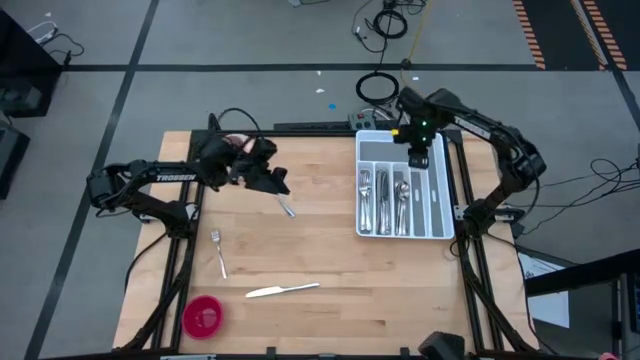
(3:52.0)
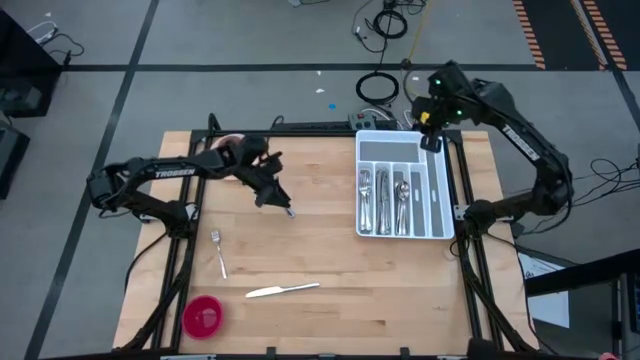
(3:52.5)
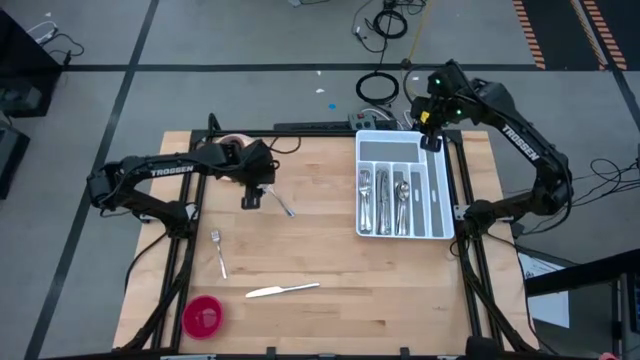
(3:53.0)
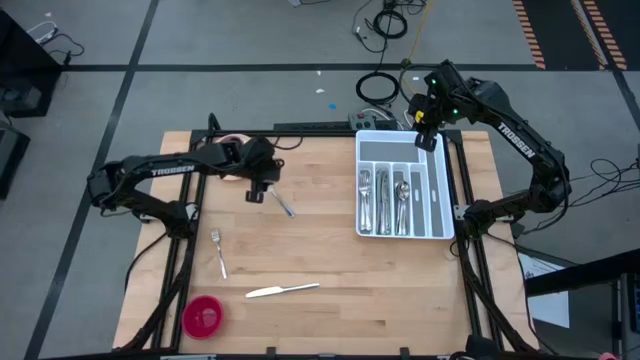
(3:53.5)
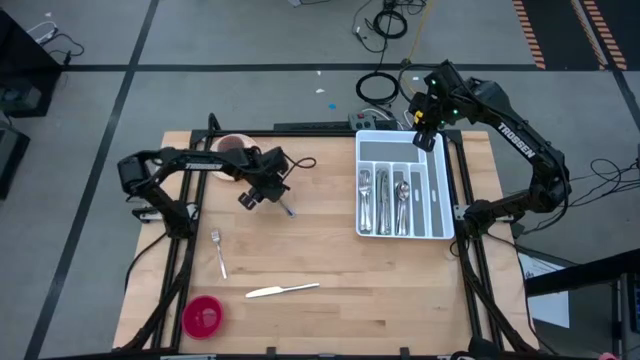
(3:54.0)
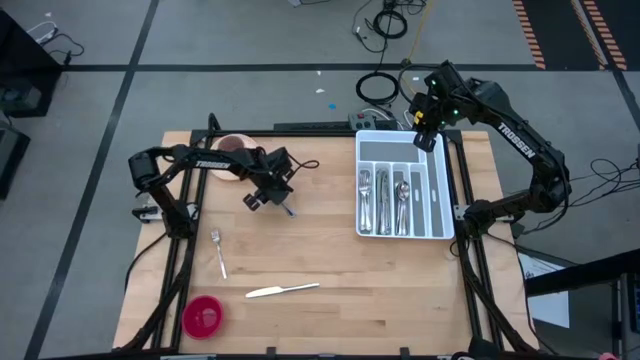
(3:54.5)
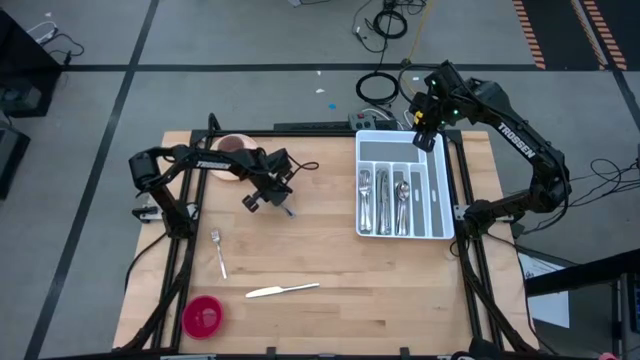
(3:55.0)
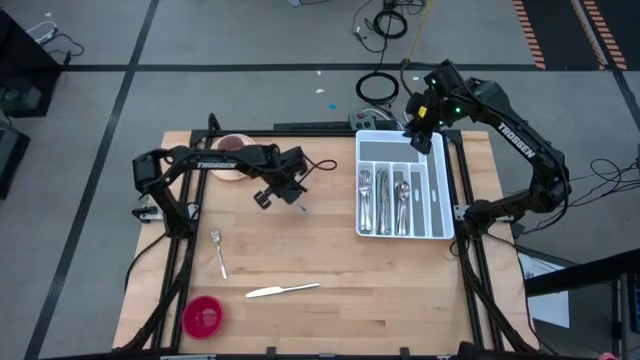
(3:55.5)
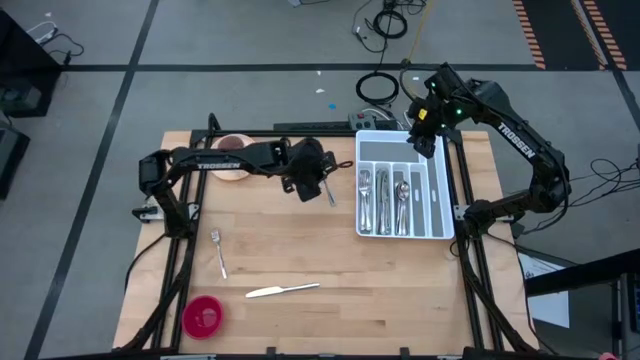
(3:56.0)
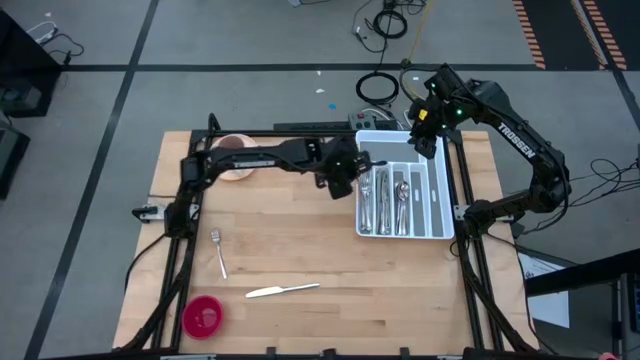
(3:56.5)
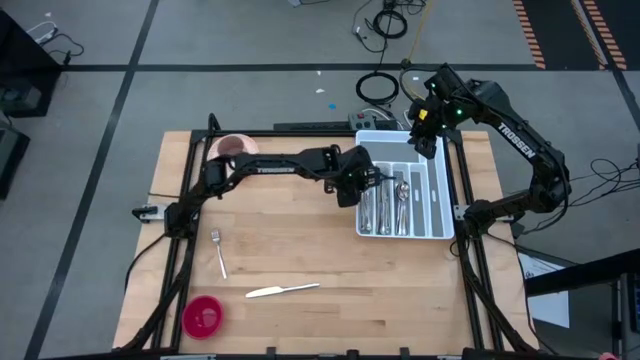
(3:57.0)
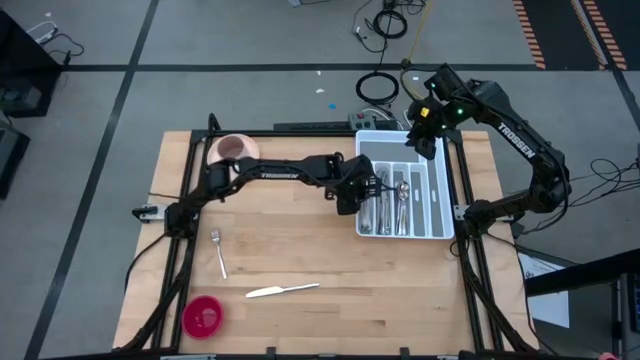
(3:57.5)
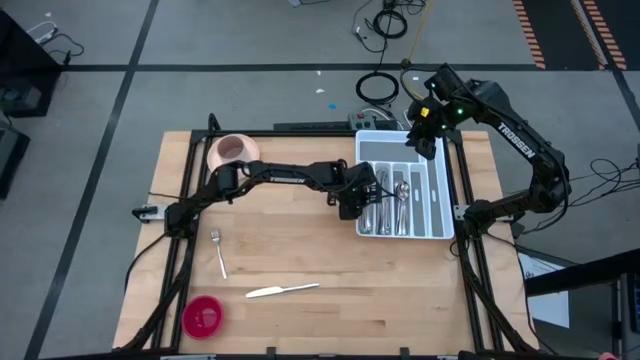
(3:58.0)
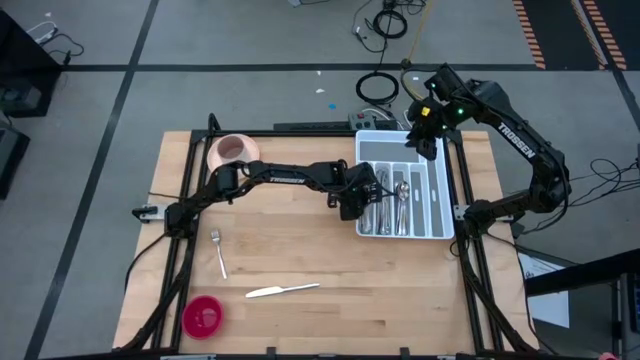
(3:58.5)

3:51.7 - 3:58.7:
Task: Sort silverware
Put the top silver fork into the white silverware tray

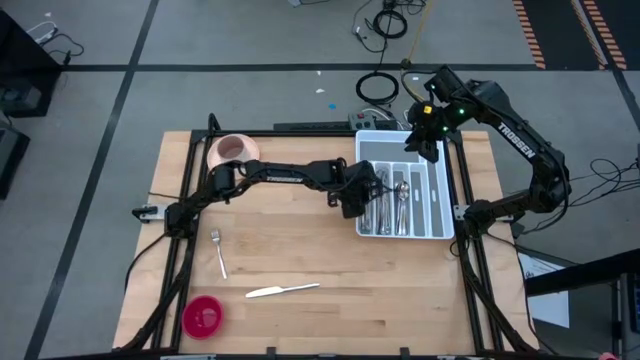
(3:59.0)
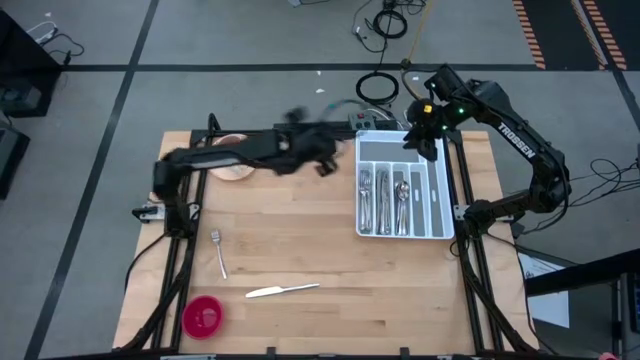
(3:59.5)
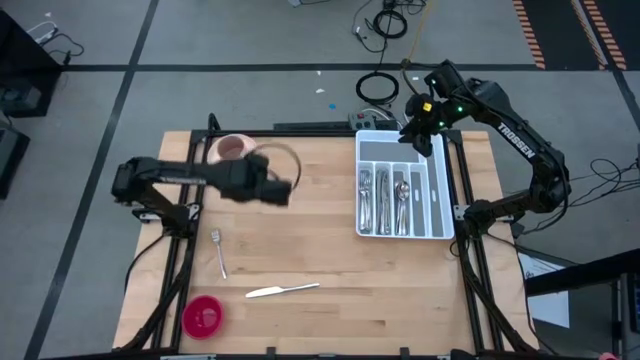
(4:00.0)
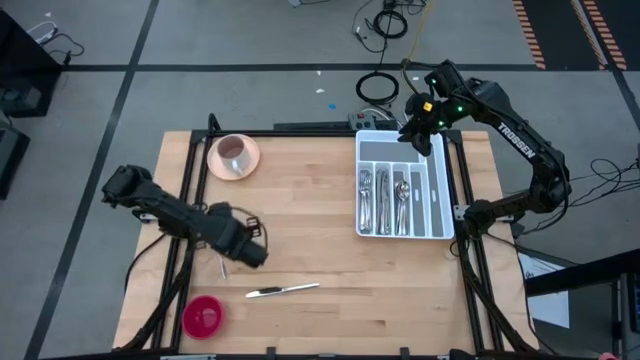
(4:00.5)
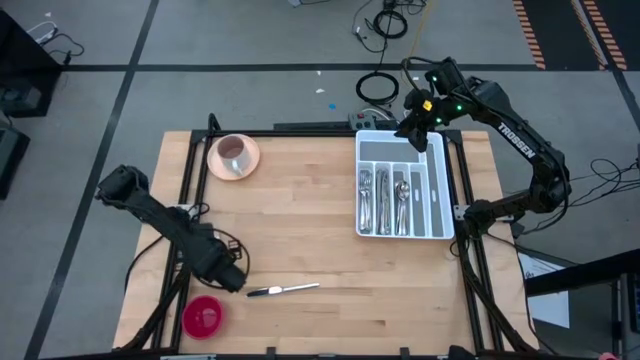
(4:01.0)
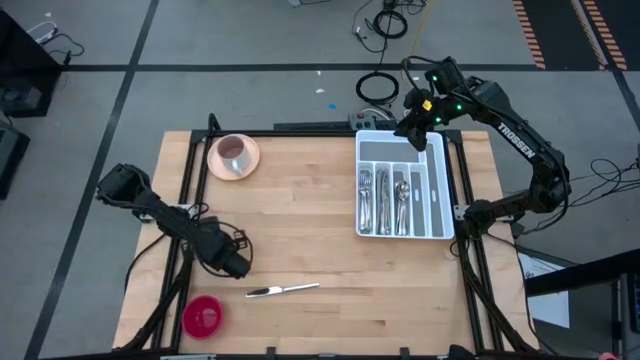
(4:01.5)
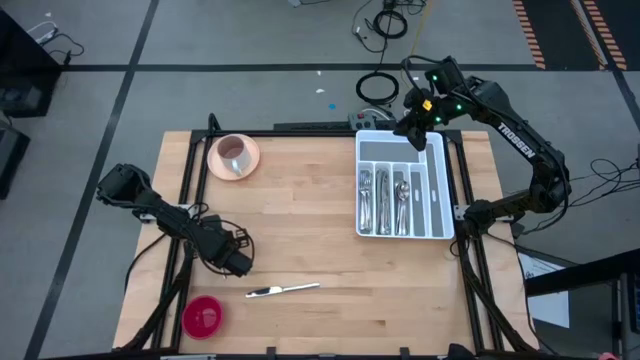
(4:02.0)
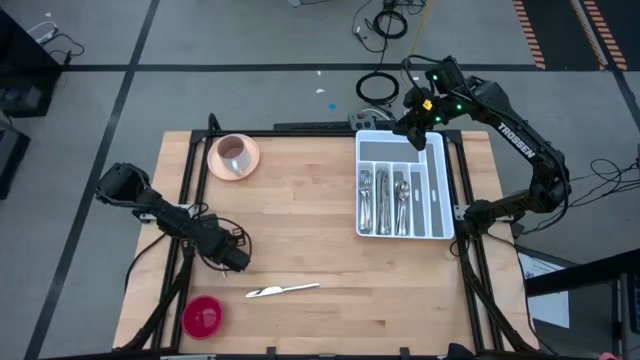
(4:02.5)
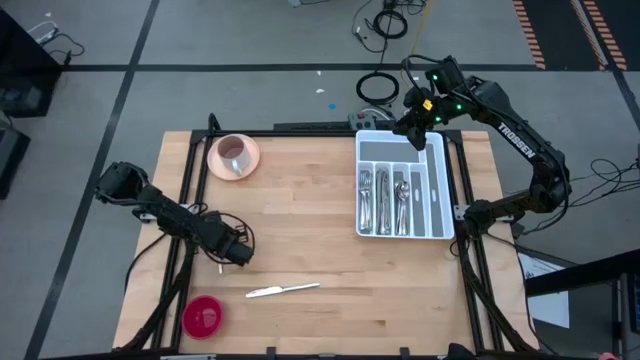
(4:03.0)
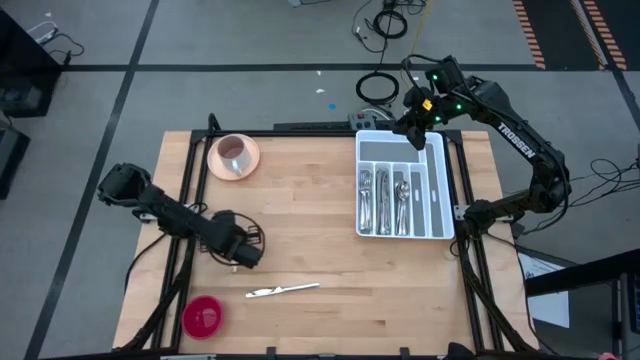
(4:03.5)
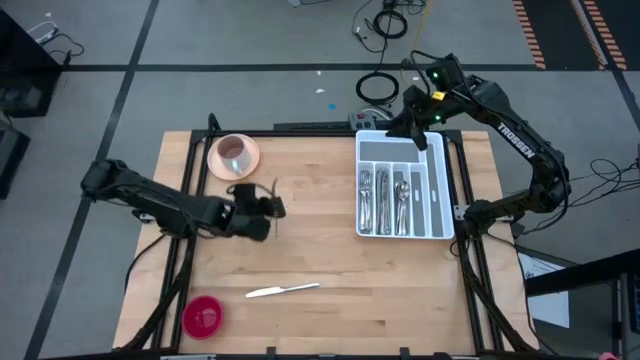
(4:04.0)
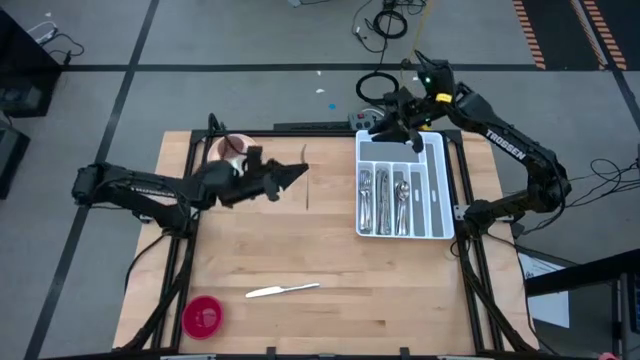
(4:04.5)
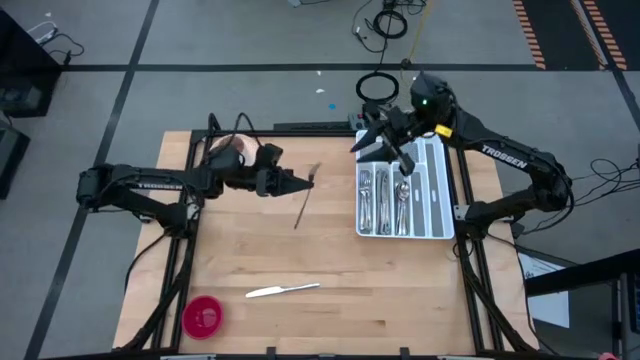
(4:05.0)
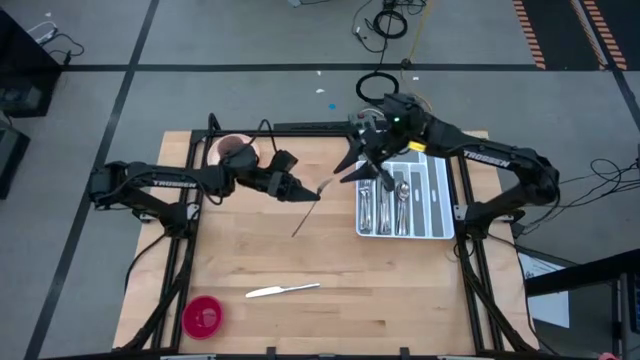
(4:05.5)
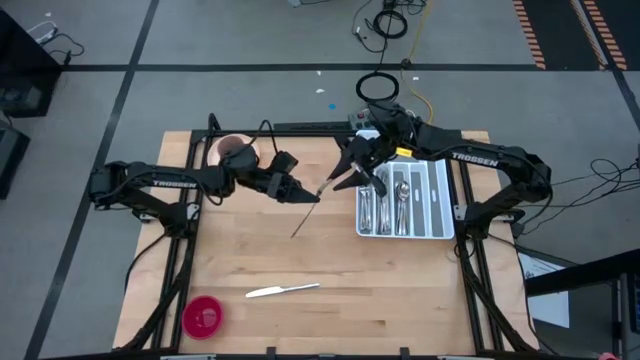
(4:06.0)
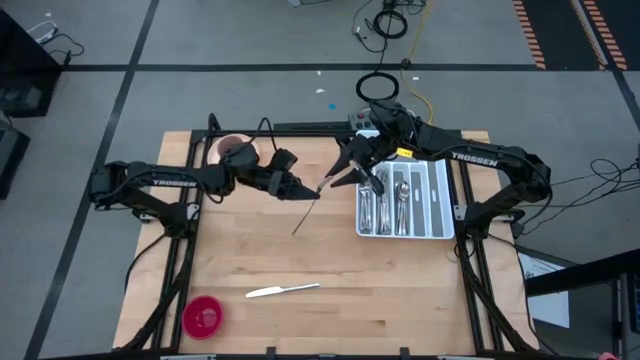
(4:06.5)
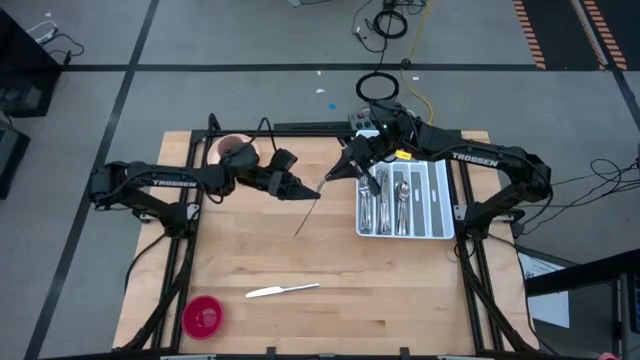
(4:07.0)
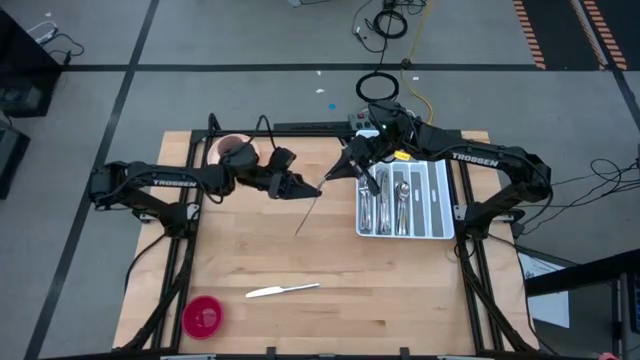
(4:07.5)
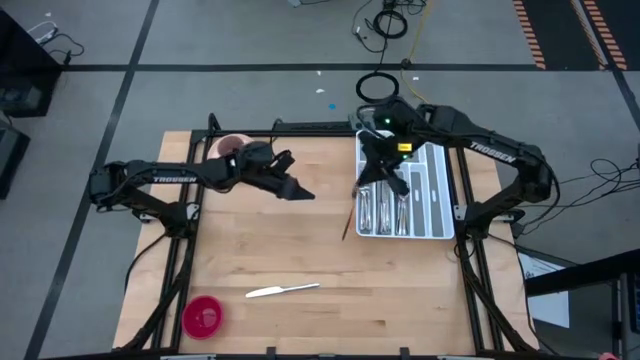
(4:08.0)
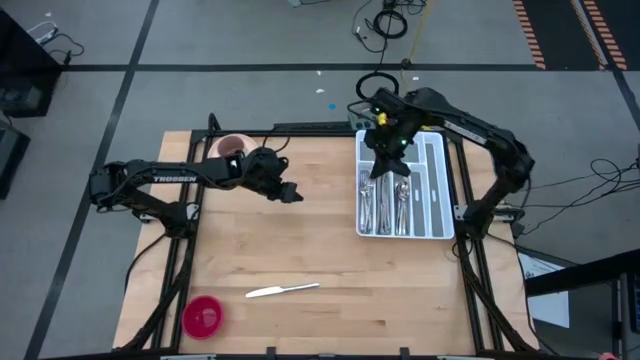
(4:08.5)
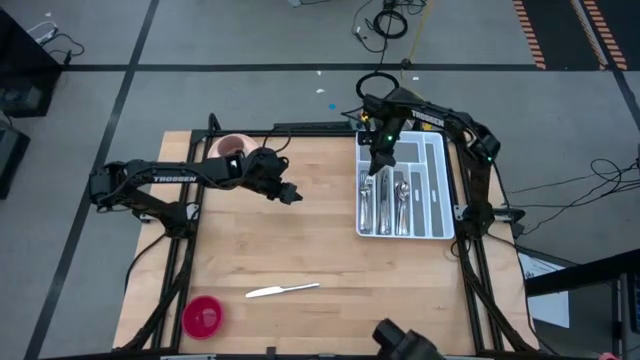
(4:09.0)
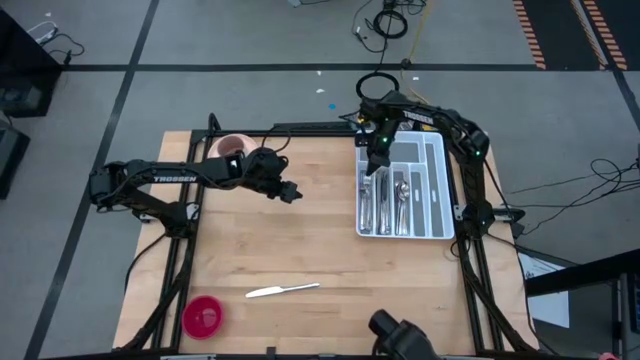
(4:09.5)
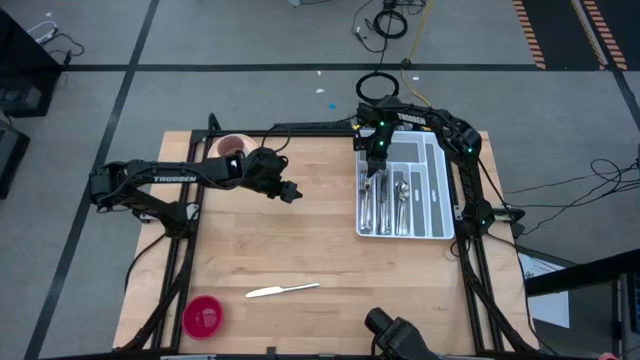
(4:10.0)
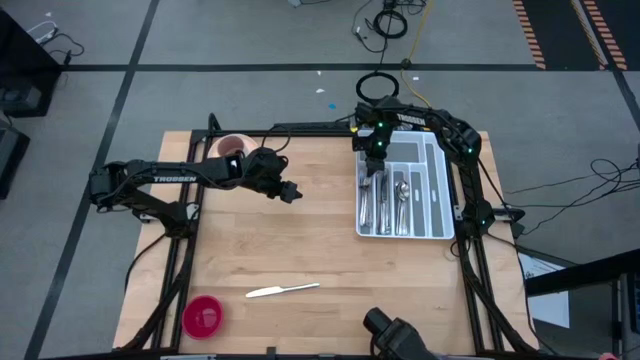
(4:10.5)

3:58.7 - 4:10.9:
Put the silver fork into the white silverware tray

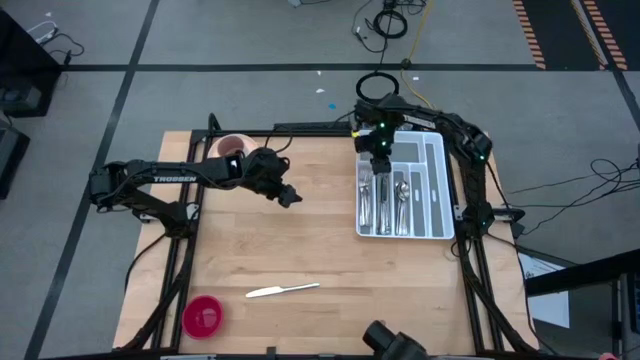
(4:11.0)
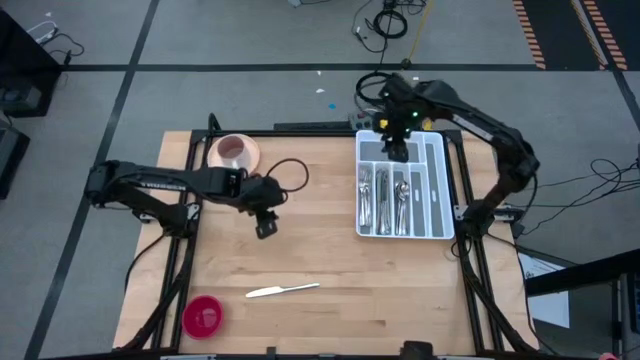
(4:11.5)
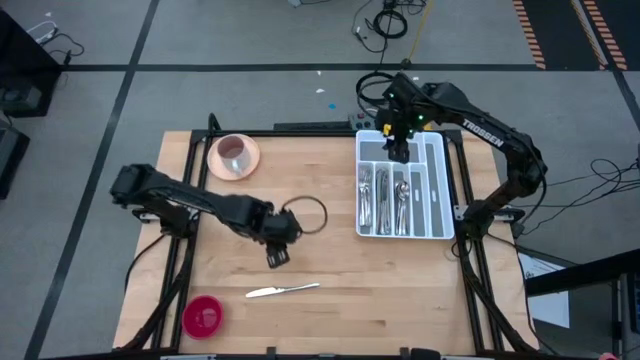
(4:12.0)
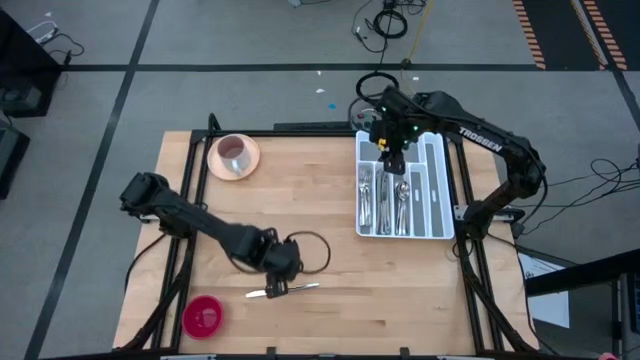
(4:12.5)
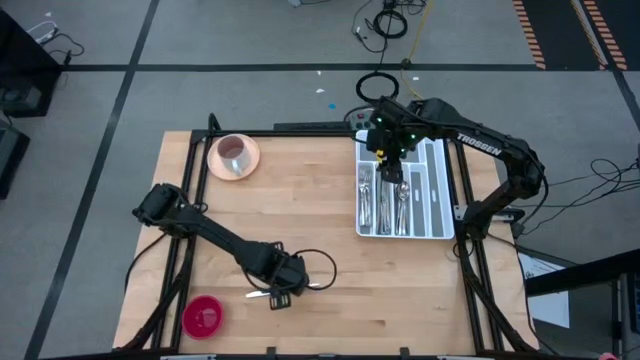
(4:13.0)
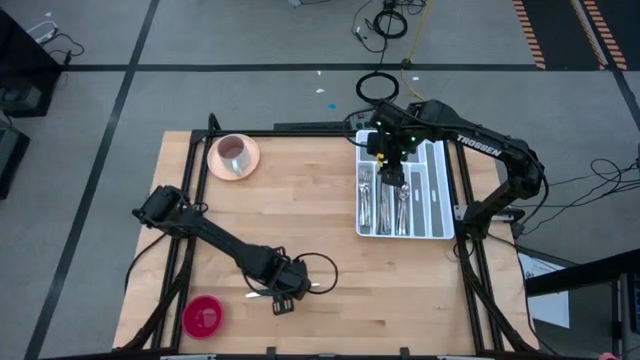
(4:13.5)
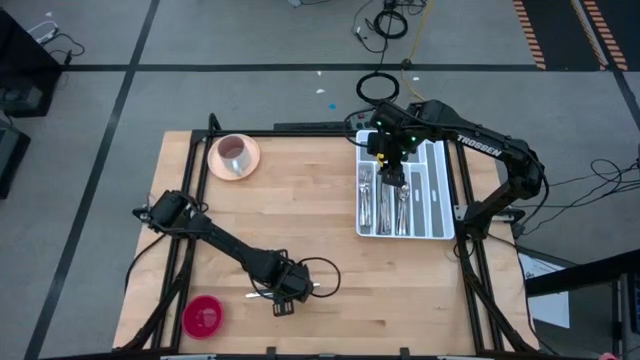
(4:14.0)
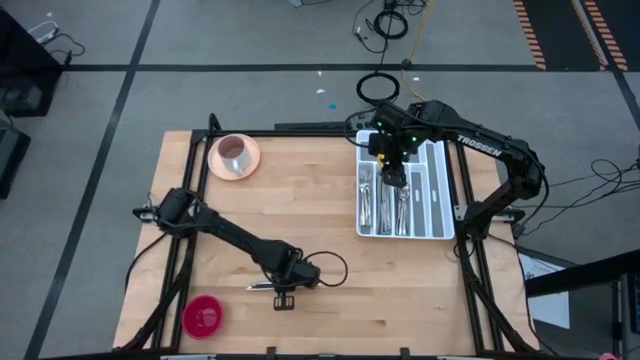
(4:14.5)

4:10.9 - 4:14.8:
Put the silver knife into the white silverware tray
